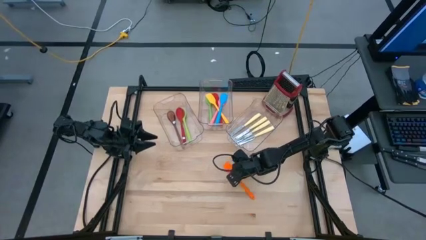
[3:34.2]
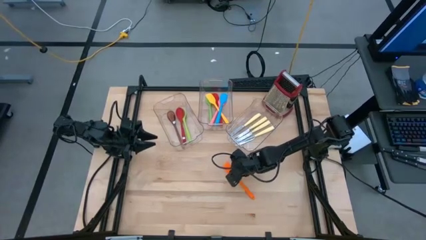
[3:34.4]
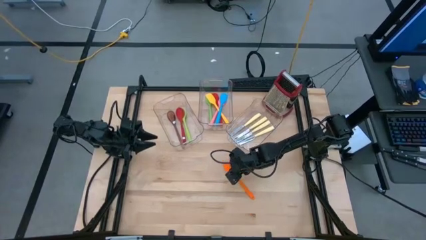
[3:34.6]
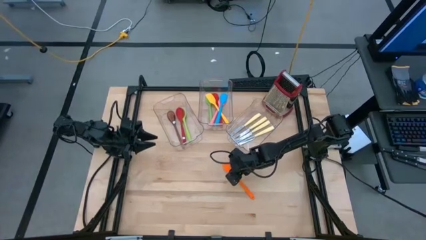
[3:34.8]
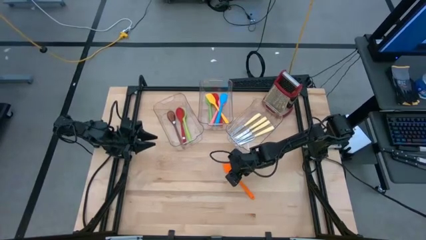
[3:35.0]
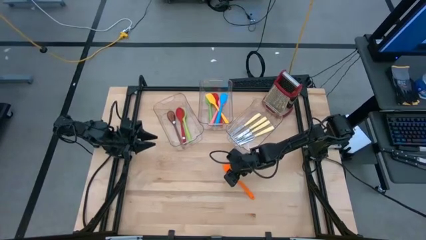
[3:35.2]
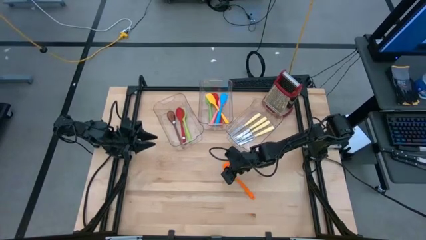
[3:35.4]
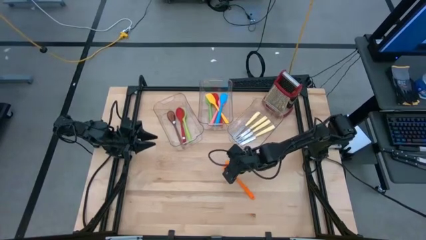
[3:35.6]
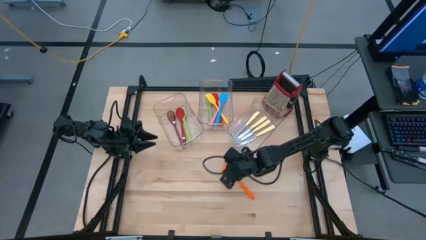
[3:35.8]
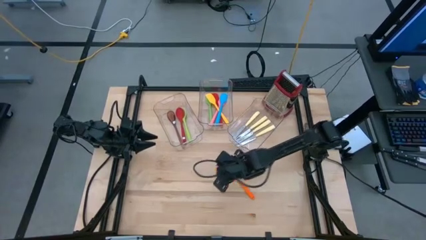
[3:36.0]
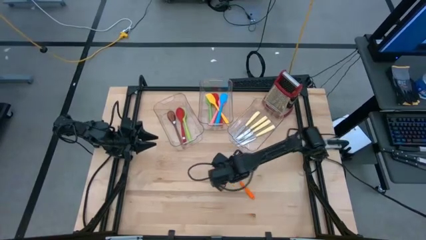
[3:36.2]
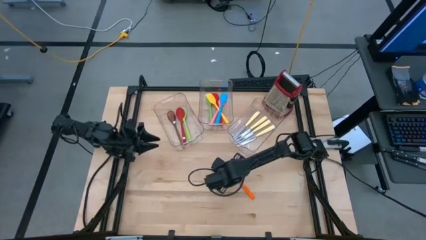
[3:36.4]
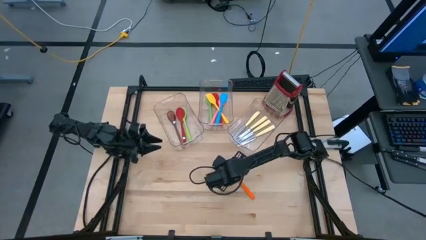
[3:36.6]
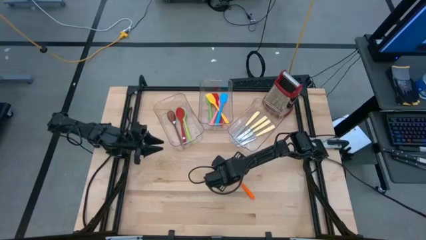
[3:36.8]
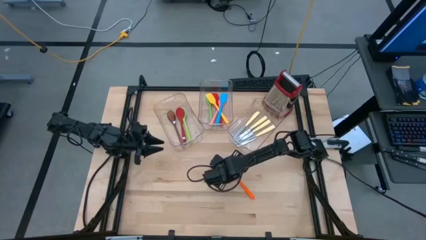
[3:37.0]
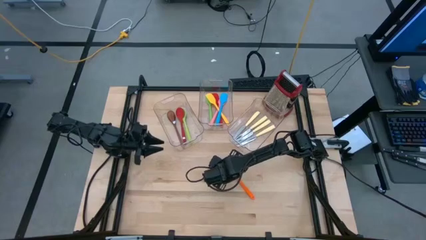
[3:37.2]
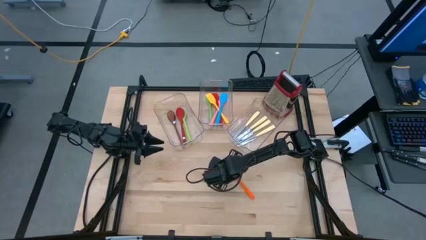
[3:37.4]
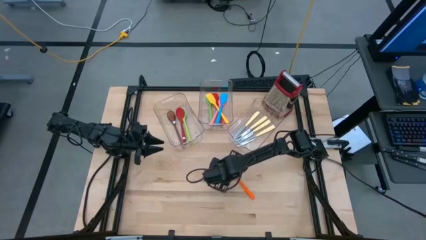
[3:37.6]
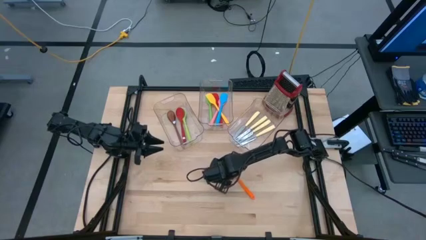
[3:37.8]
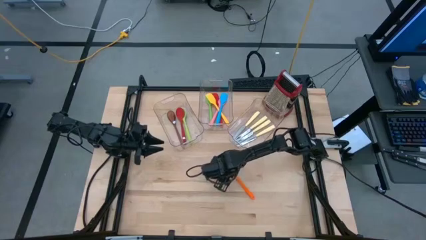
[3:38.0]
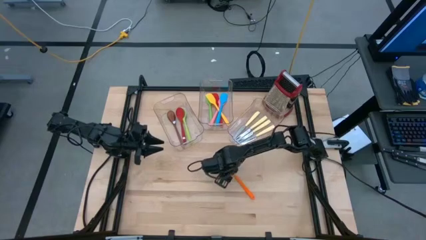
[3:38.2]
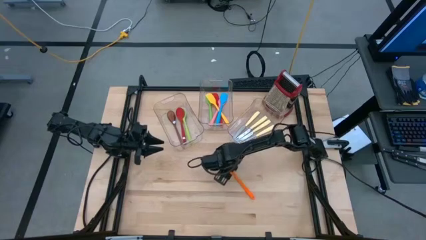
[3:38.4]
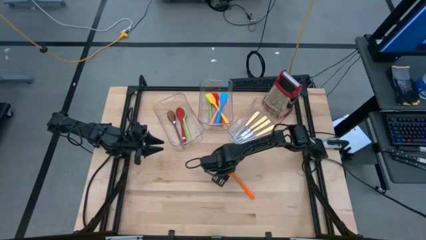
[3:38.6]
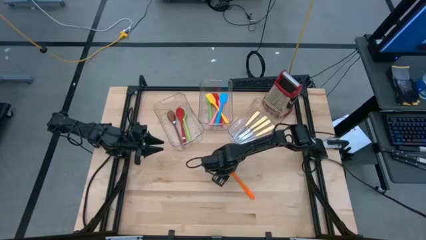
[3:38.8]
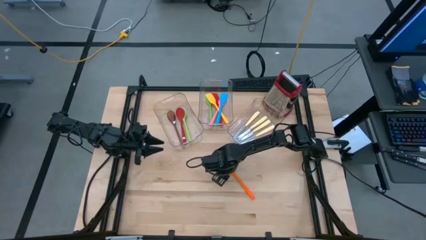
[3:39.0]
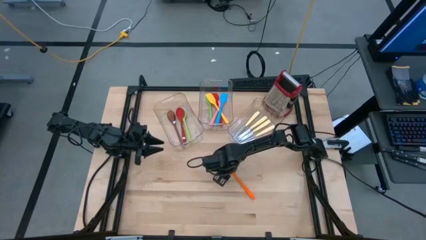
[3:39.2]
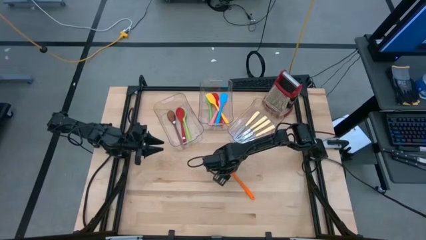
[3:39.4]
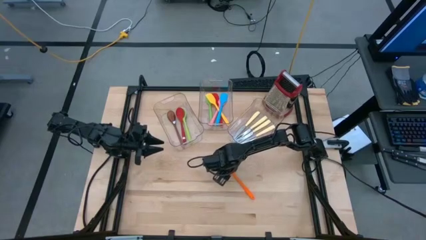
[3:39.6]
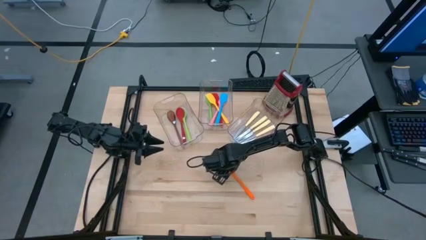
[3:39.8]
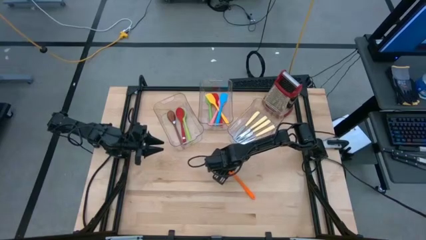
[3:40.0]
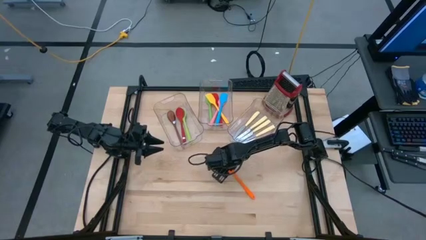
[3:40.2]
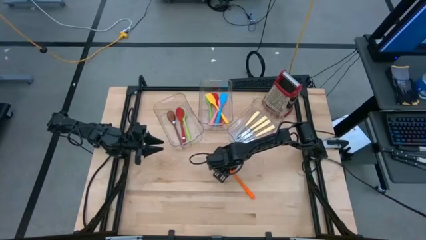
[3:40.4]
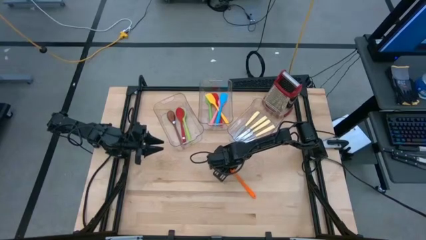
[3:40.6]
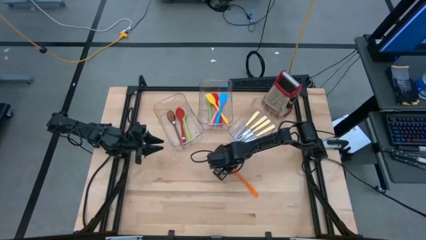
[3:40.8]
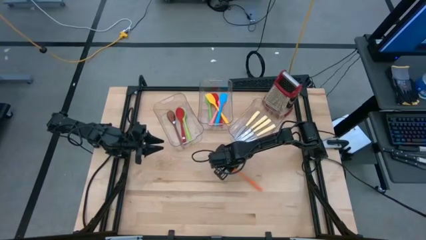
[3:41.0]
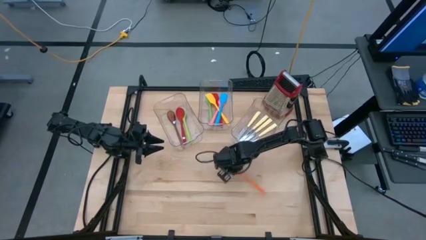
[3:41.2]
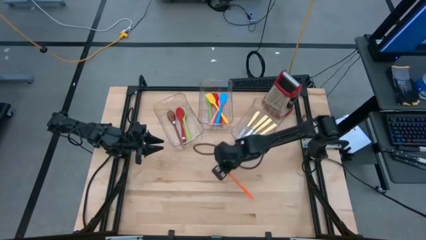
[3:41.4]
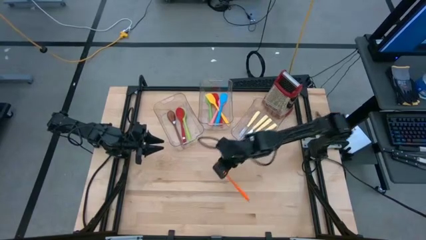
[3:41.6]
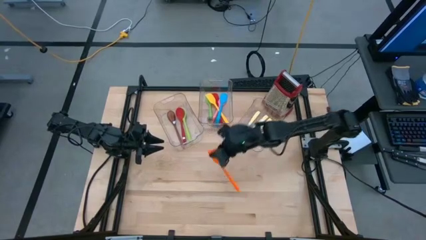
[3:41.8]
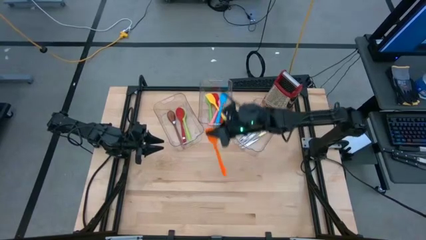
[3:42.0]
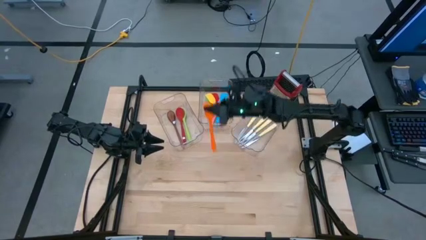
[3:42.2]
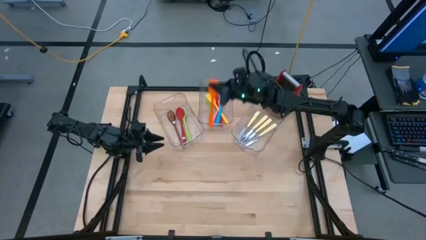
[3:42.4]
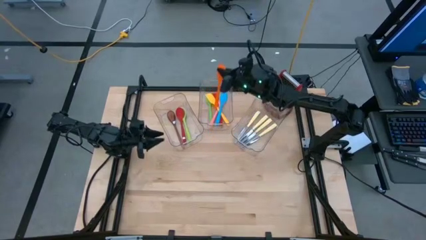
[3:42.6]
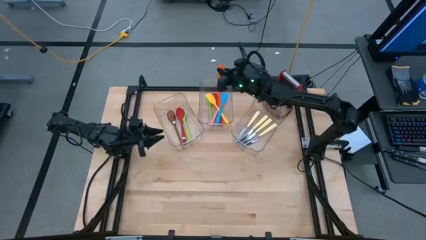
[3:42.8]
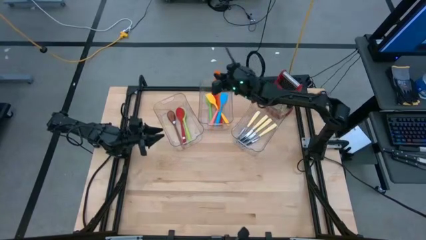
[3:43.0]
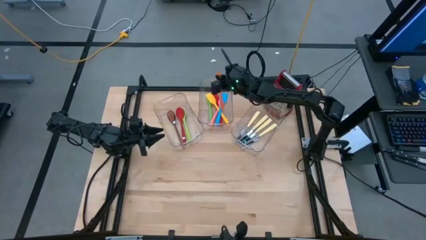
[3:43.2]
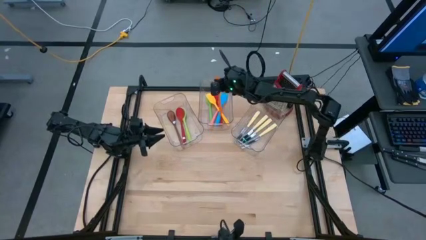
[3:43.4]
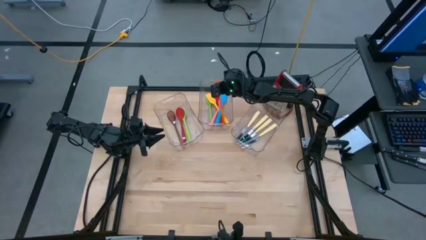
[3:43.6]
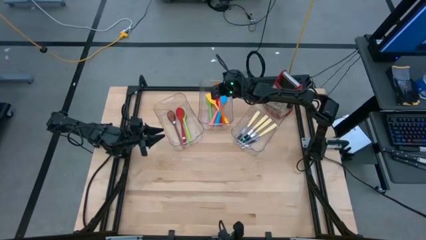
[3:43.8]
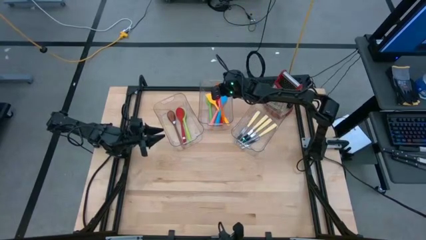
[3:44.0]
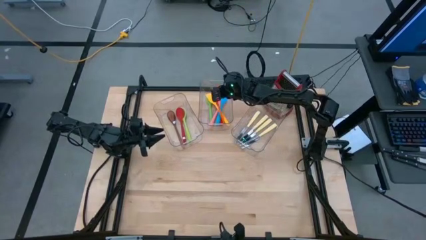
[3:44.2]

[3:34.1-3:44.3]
Task: Pick & Place Kitchen Items
Put the orange spatula into the middle transparent bin

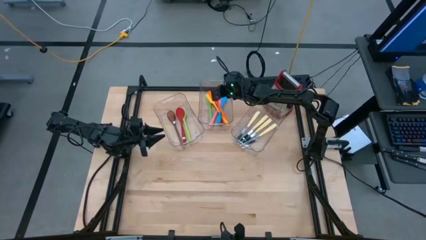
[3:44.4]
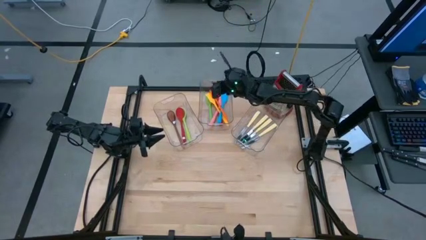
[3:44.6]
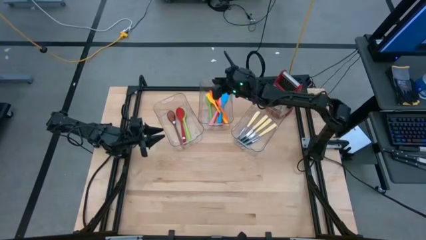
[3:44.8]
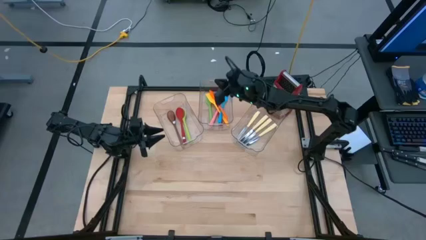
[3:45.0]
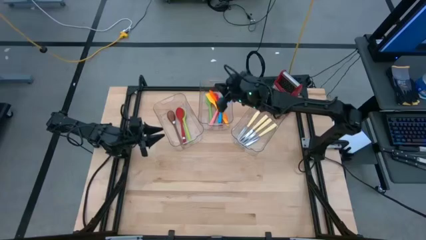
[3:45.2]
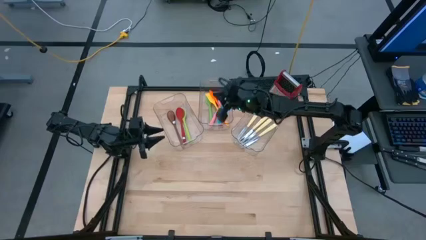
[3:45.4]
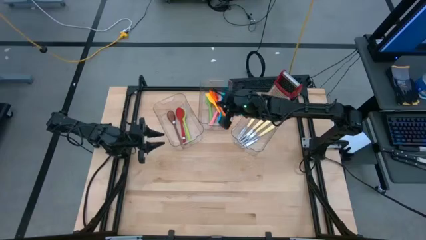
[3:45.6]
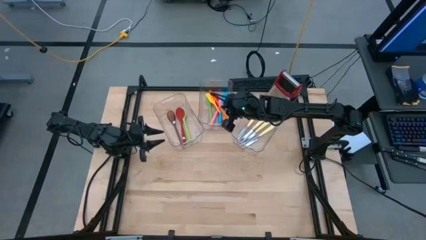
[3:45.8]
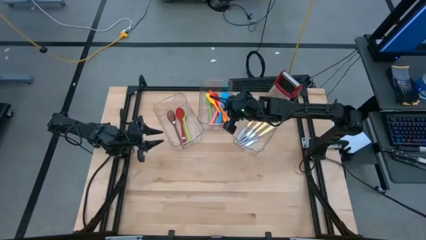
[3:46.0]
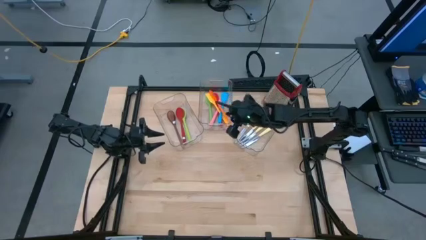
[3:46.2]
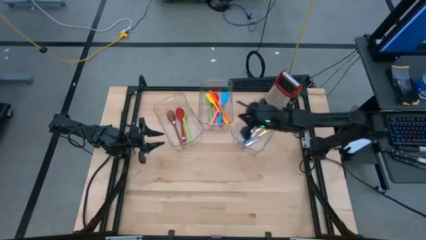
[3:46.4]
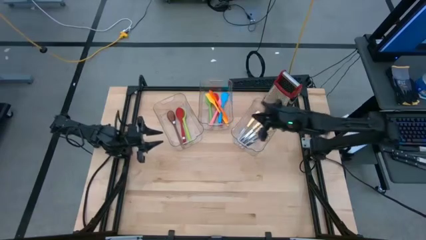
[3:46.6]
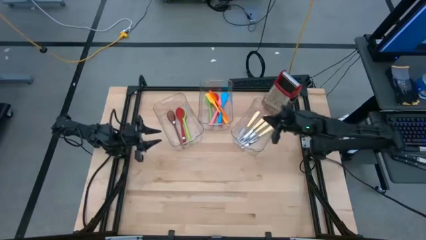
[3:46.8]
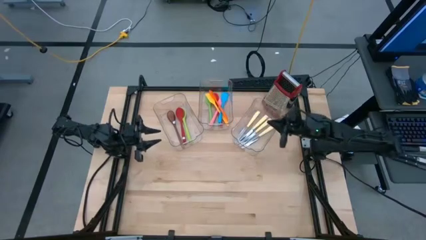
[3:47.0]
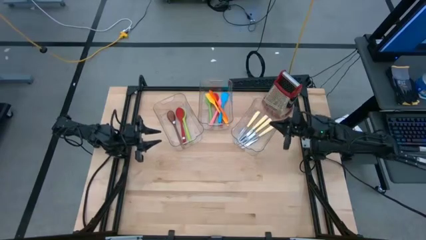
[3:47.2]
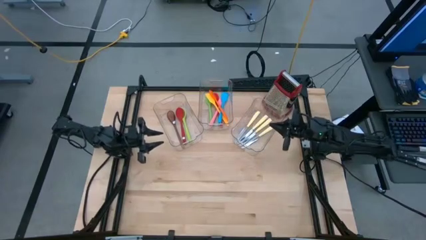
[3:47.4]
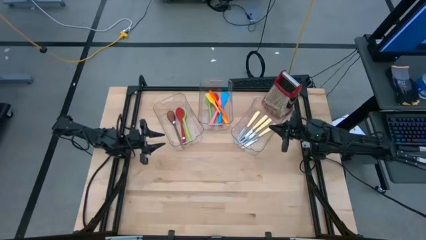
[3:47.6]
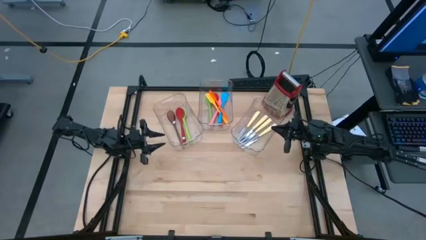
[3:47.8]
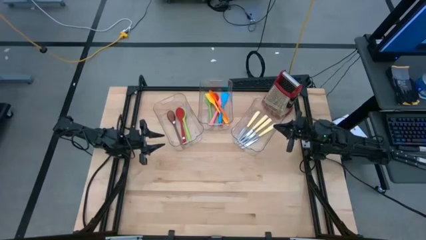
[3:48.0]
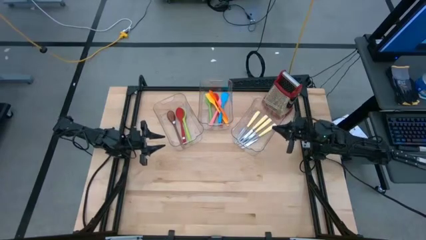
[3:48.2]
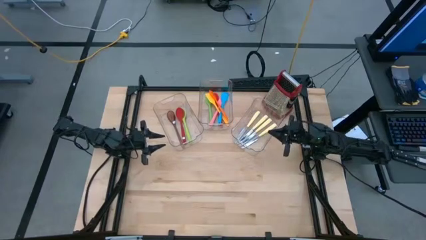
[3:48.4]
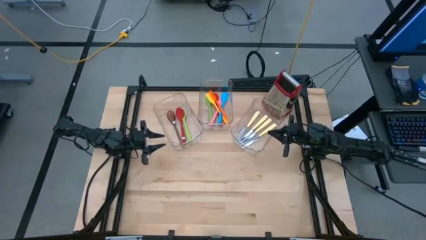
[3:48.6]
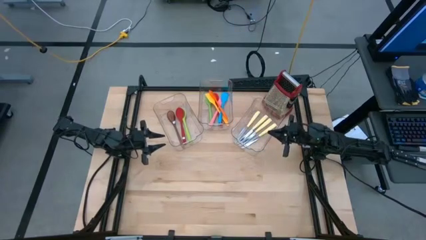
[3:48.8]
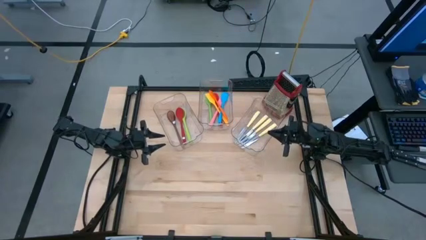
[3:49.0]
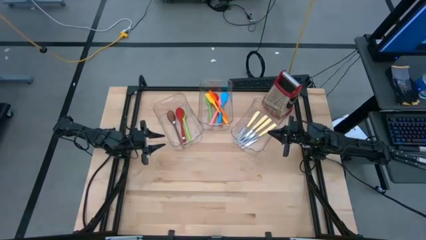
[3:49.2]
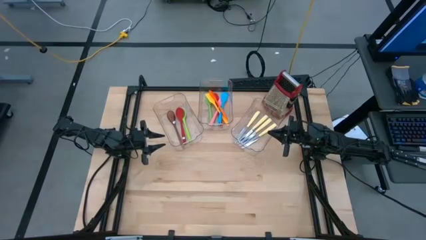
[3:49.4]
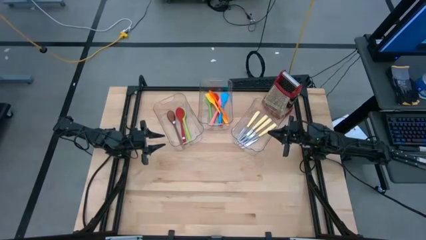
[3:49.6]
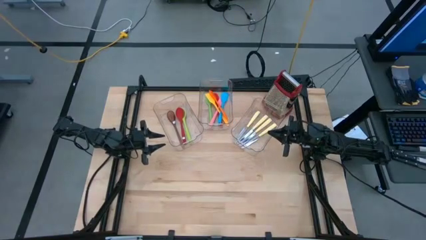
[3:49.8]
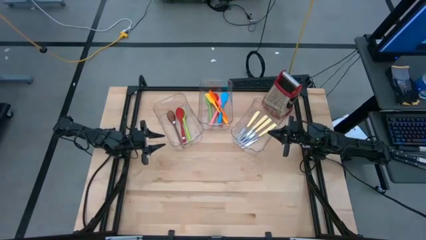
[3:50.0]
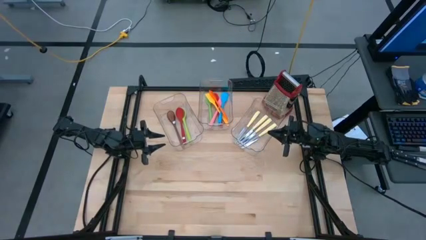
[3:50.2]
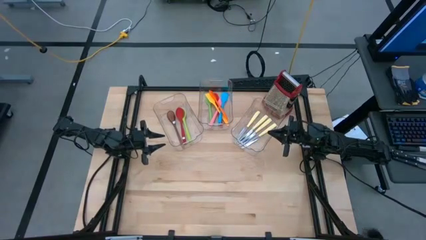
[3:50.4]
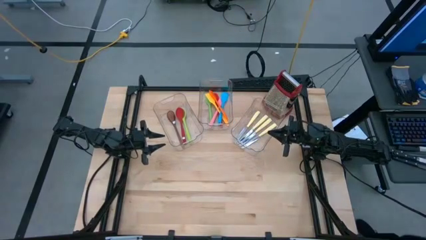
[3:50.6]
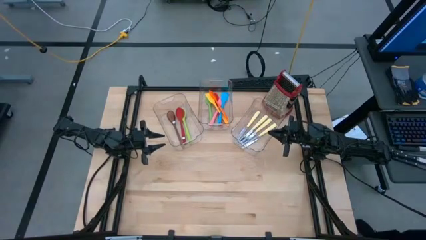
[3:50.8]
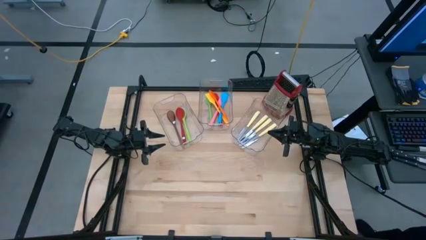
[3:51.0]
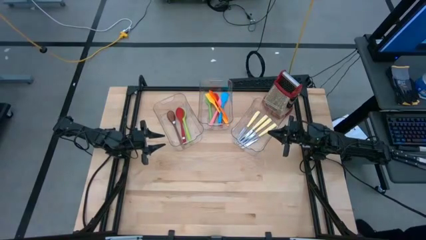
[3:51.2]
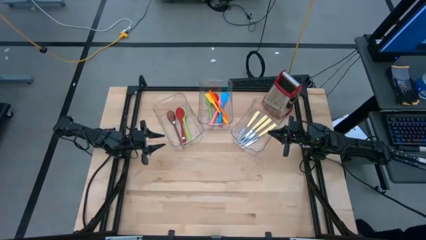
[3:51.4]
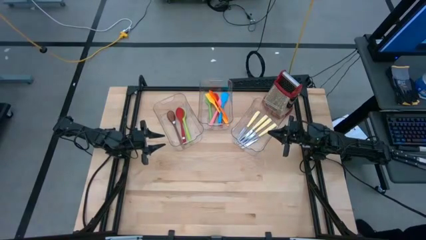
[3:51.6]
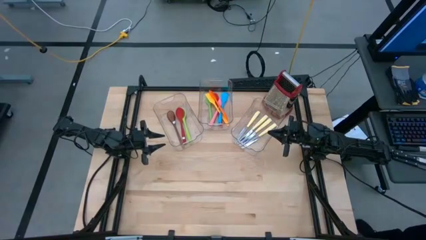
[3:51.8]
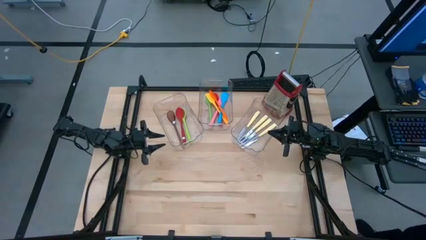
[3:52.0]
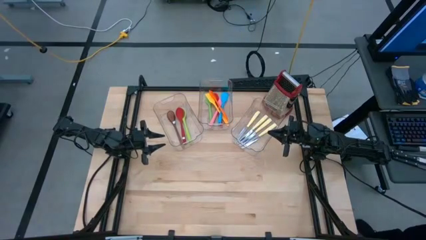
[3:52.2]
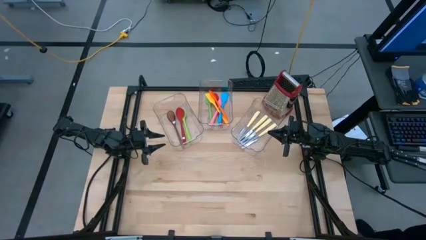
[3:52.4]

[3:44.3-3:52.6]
Return to Home Position
